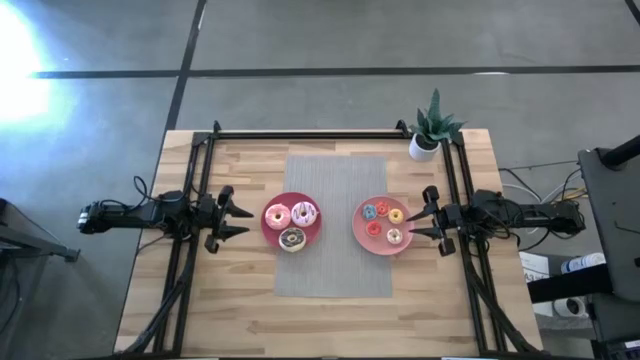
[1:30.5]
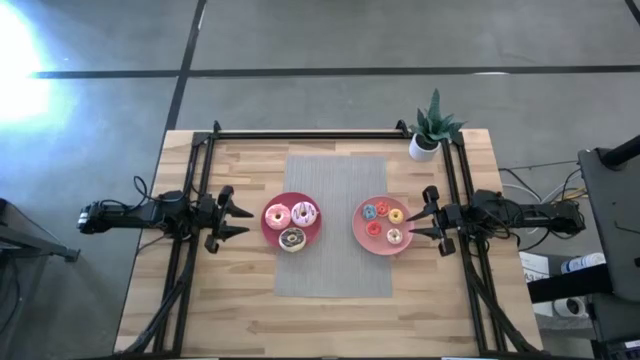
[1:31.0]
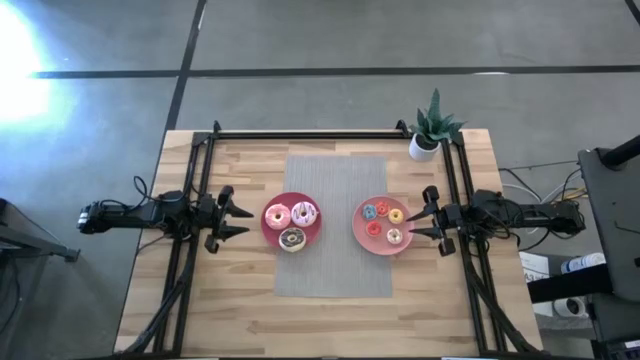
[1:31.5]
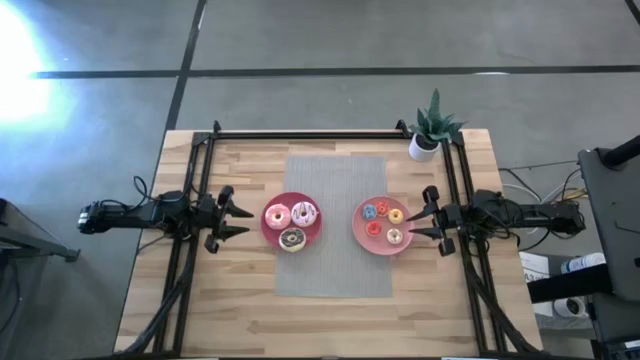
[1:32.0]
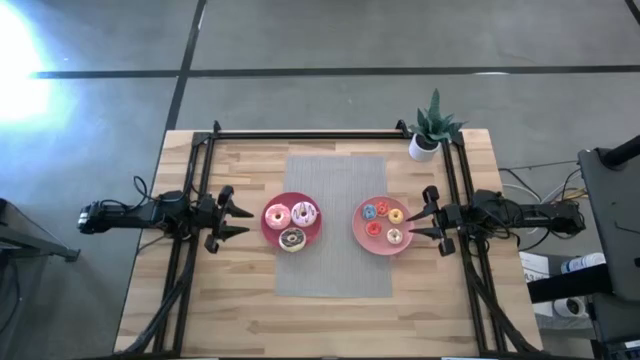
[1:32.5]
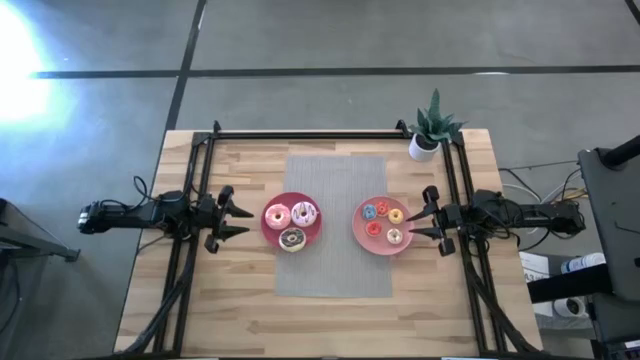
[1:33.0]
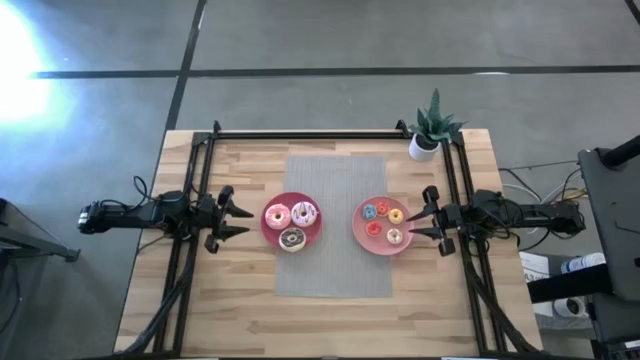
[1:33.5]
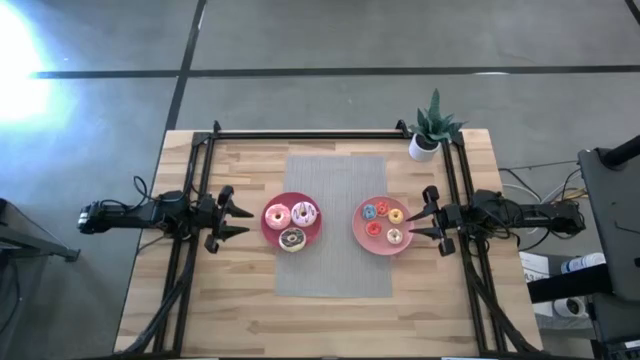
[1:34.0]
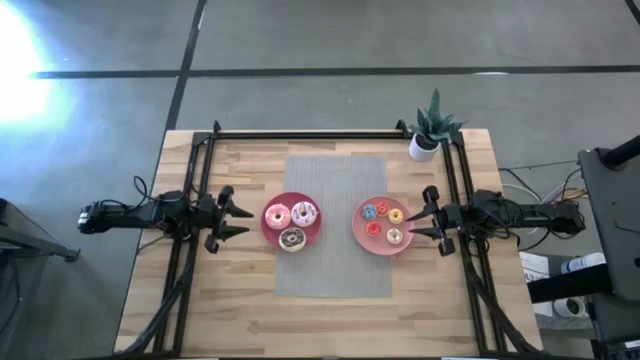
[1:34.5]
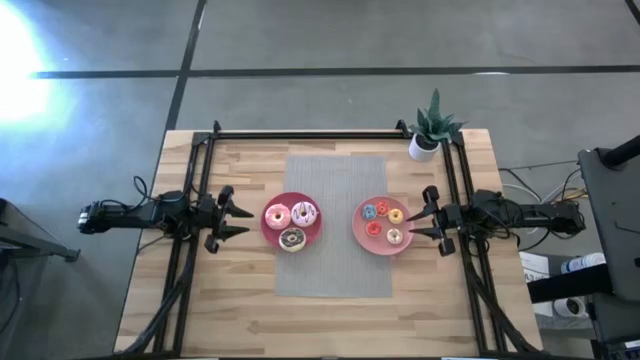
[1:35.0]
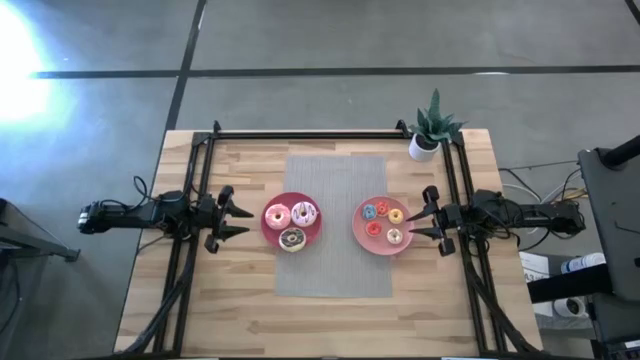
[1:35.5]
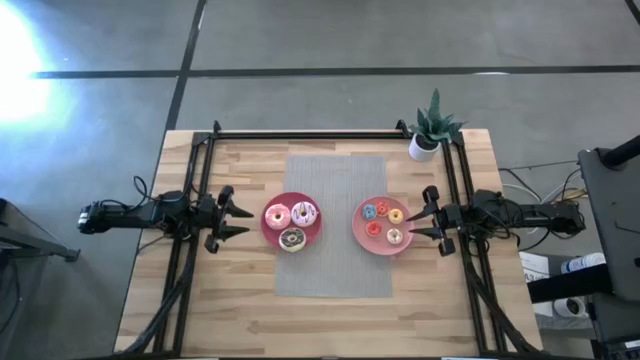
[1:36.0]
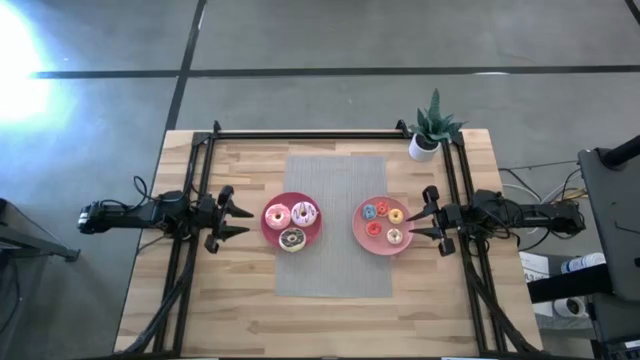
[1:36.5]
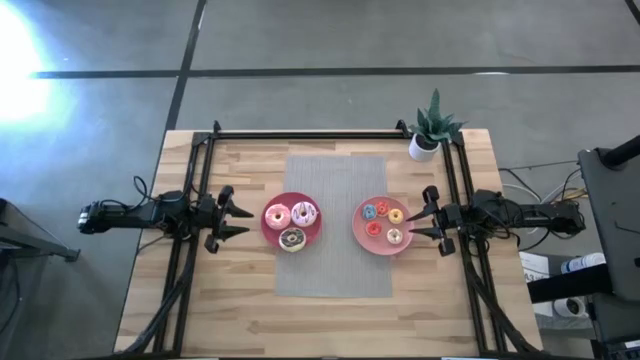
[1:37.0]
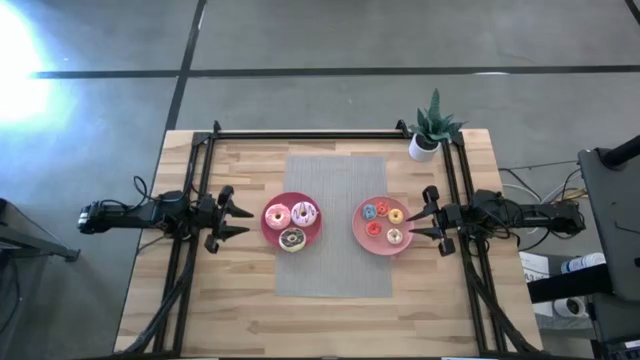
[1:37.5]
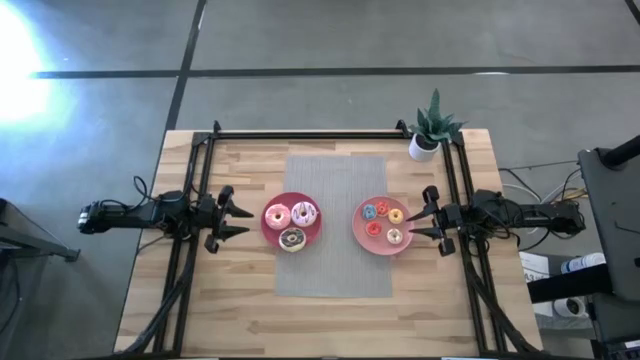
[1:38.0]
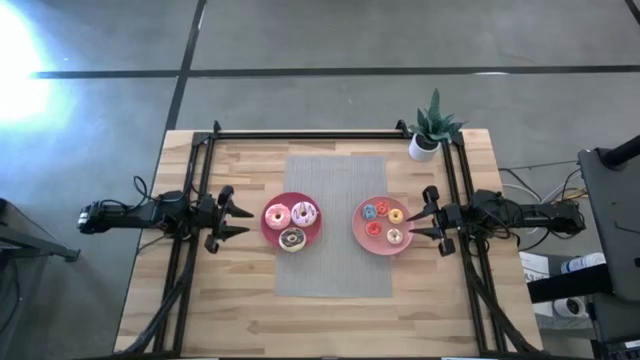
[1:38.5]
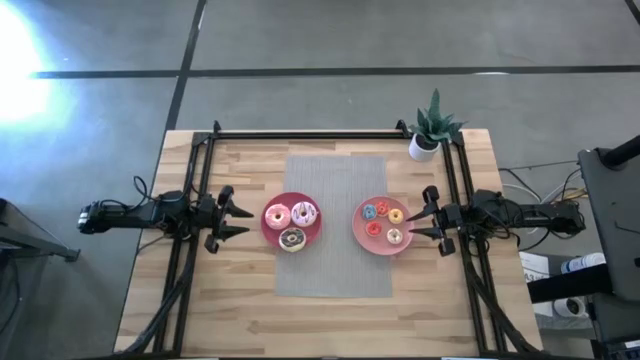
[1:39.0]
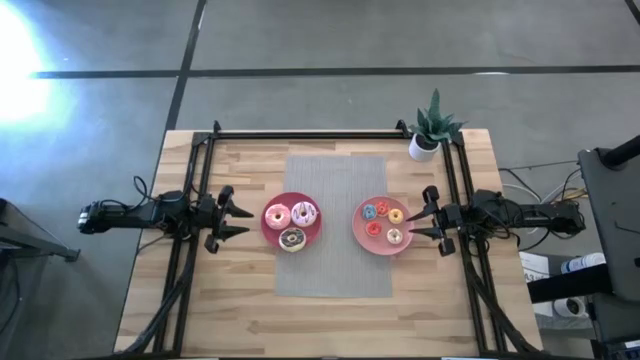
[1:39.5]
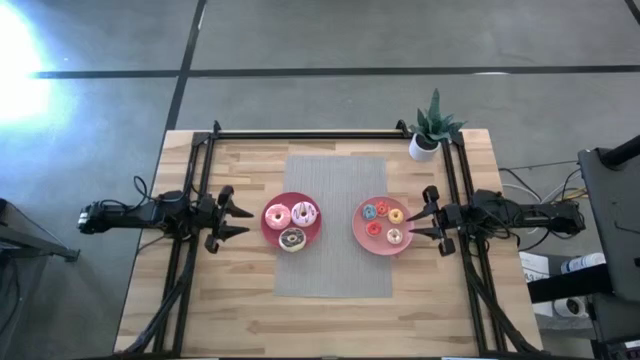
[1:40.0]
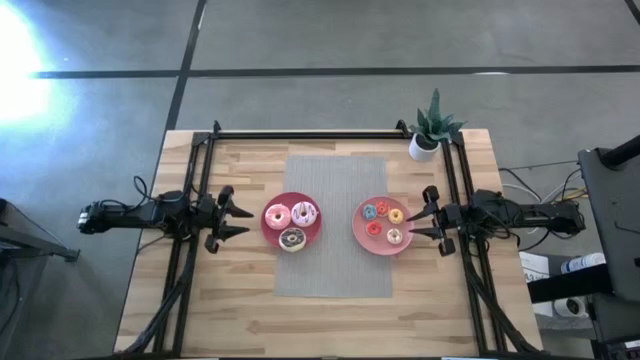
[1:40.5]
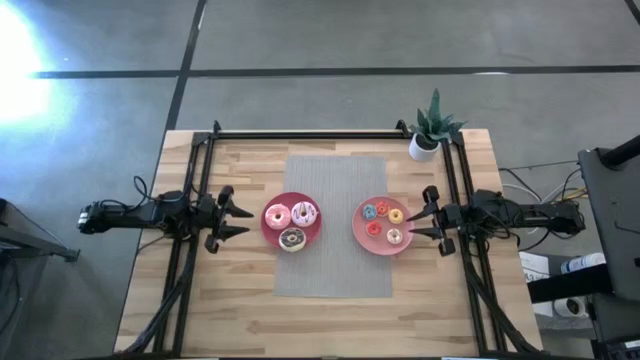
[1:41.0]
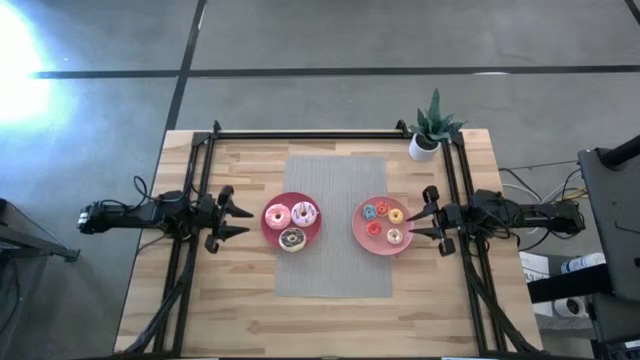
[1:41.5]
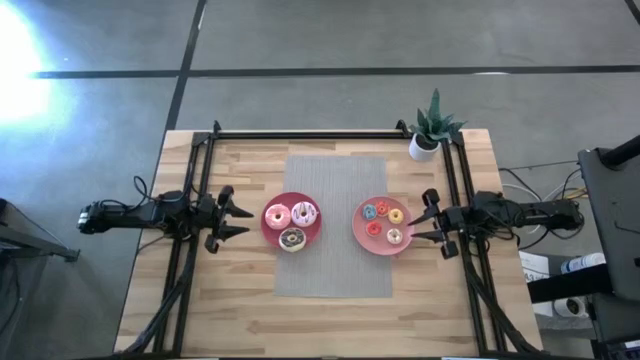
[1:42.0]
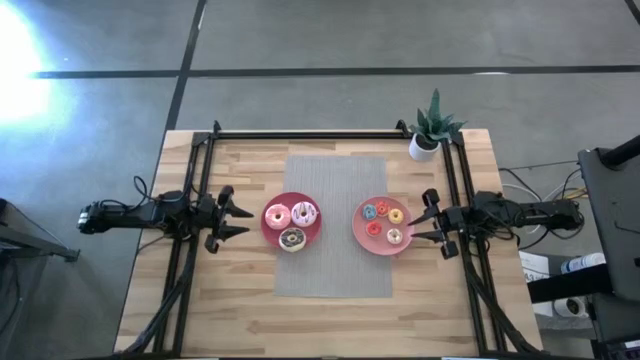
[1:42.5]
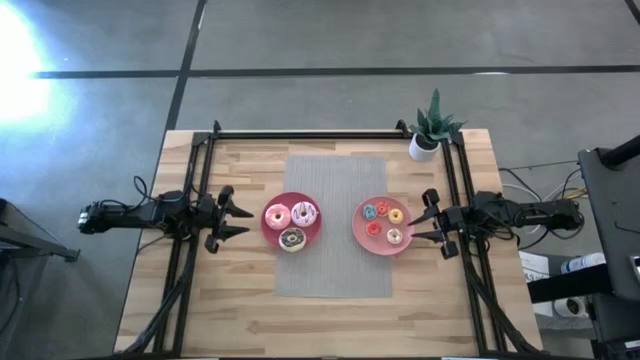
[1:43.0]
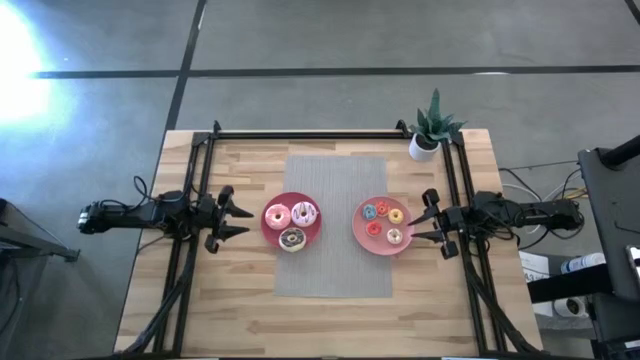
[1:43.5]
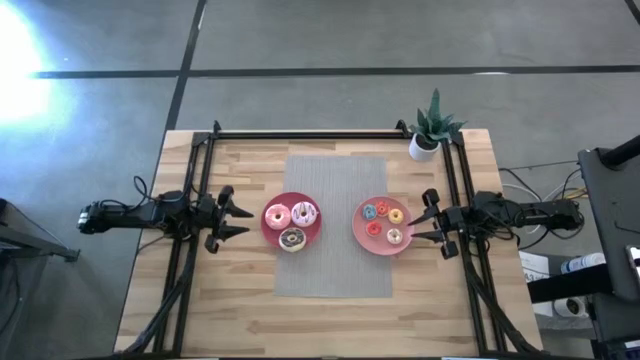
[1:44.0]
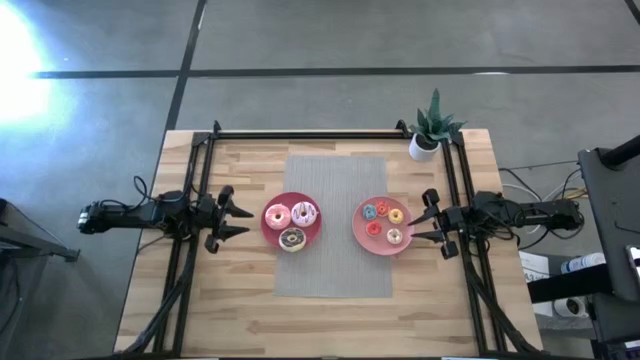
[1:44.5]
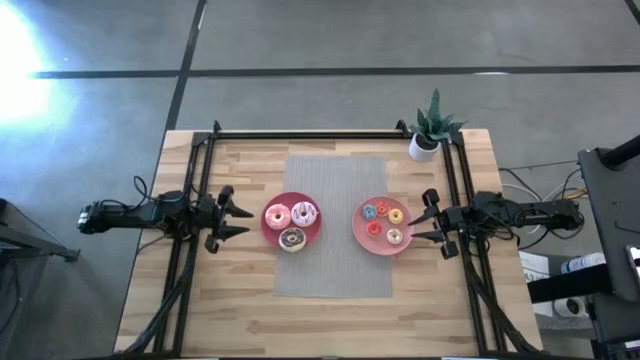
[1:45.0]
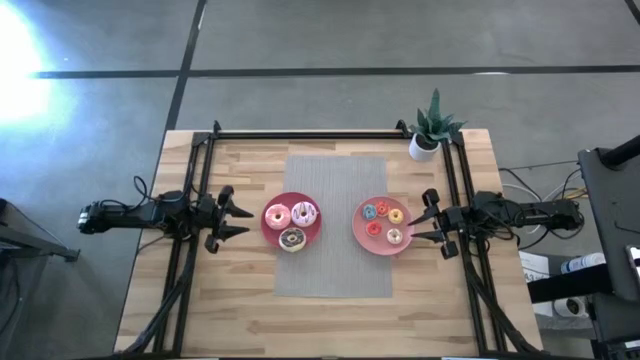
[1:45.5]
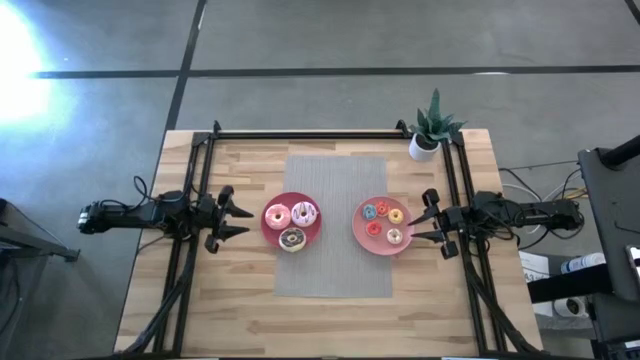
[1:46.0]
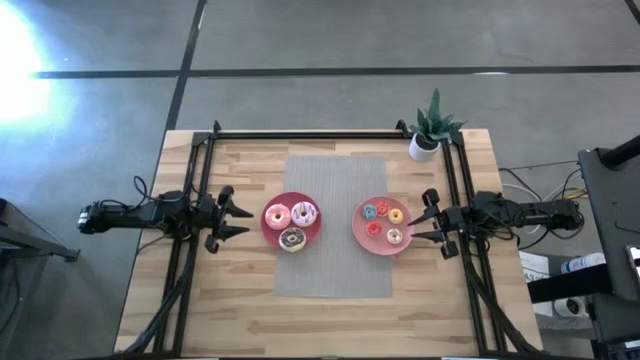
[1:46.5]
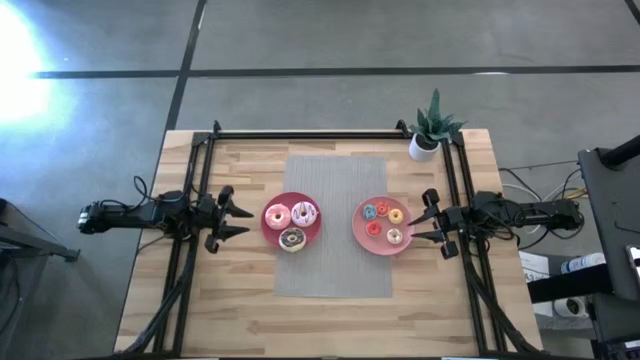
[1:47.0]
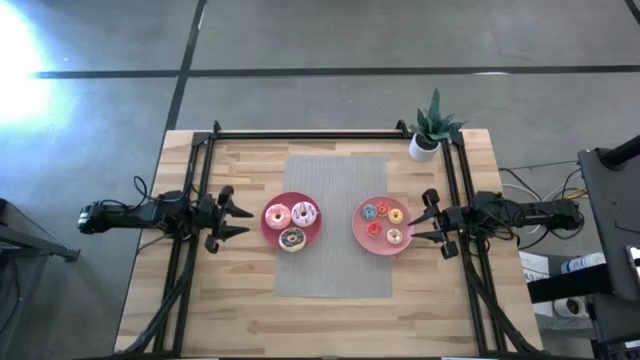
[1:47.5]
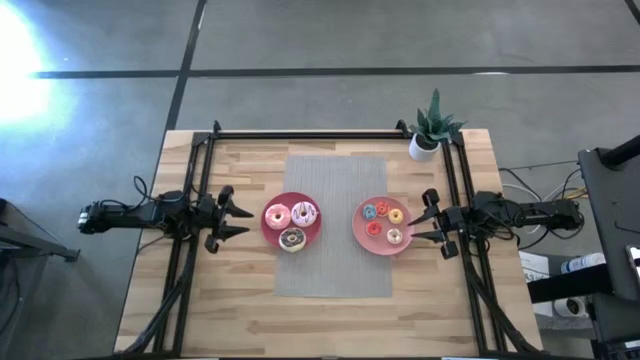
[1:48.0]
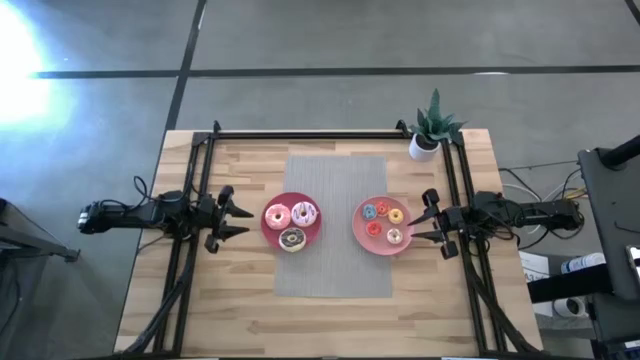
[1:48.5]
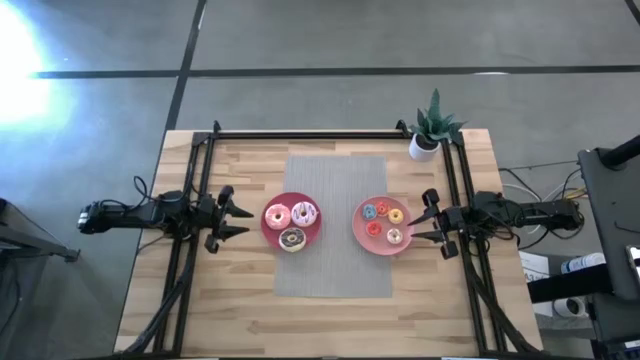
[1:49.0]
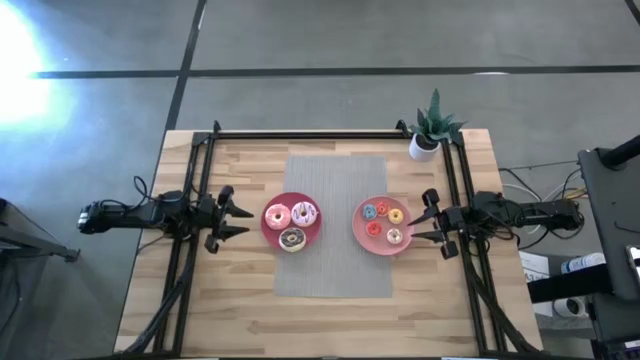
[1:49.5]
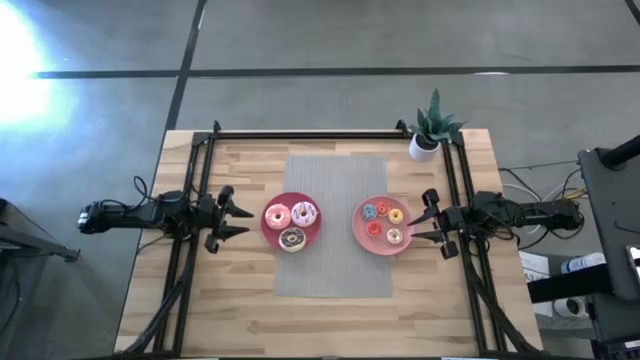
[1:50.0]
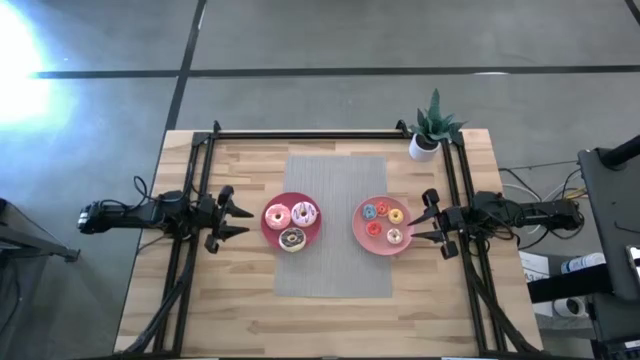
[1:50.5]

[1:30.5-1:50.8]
Task: Pick & Place donuts
Return to Home Position
